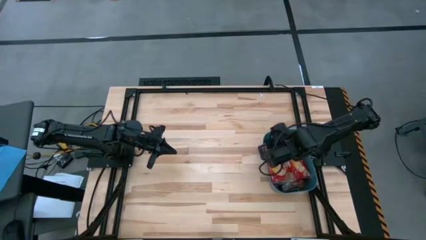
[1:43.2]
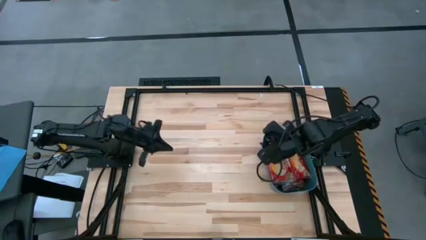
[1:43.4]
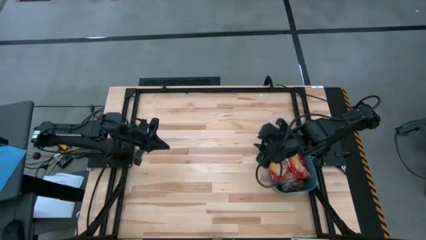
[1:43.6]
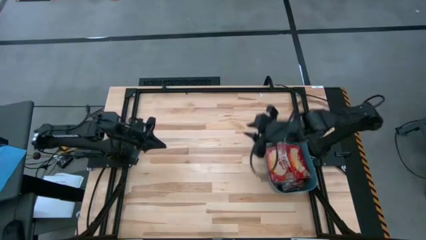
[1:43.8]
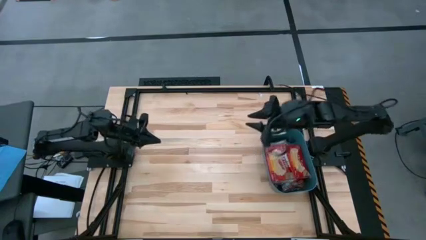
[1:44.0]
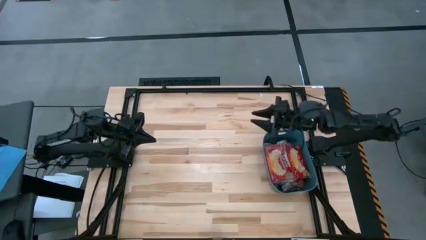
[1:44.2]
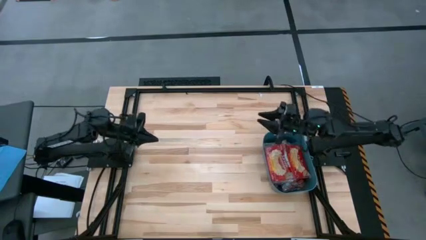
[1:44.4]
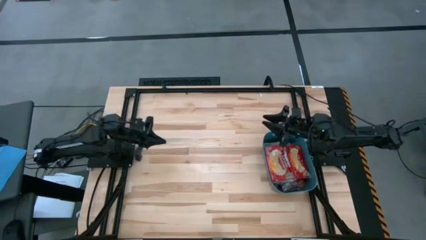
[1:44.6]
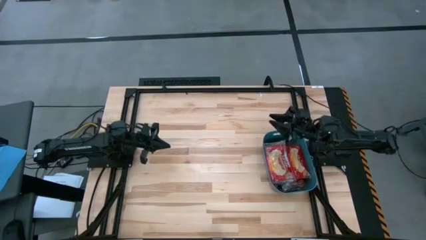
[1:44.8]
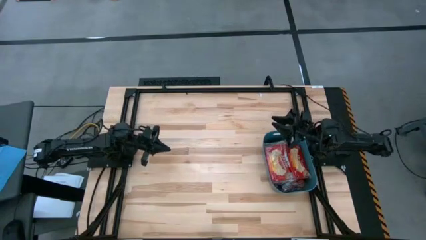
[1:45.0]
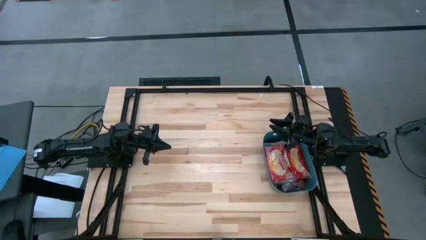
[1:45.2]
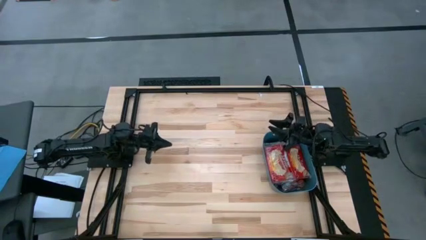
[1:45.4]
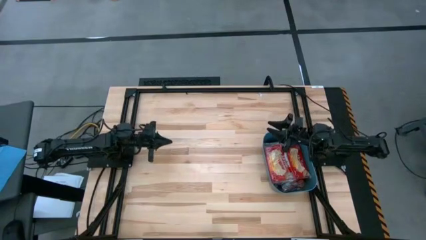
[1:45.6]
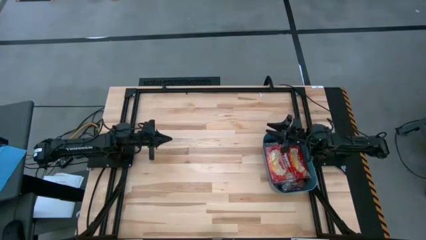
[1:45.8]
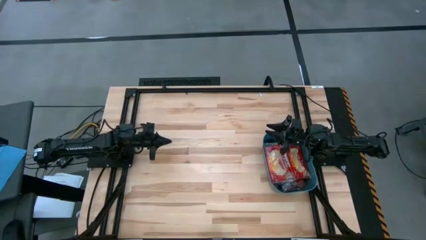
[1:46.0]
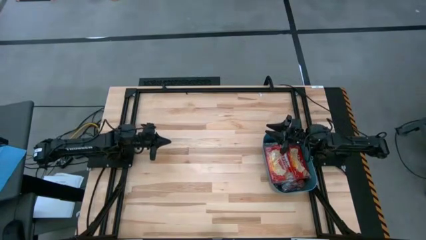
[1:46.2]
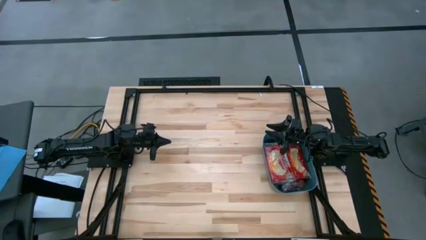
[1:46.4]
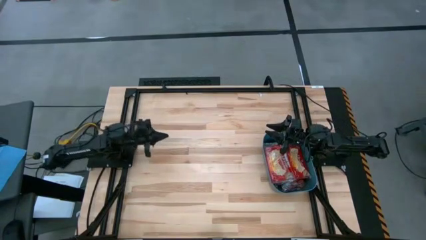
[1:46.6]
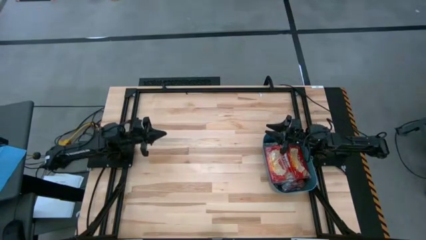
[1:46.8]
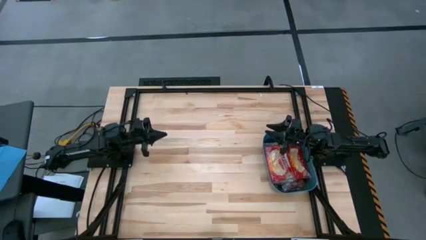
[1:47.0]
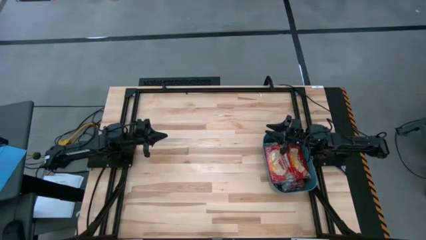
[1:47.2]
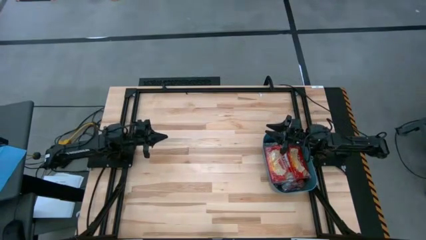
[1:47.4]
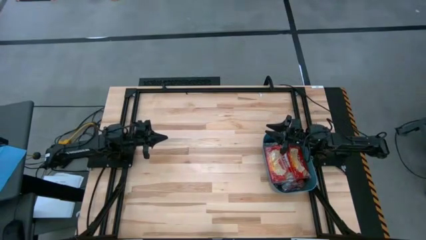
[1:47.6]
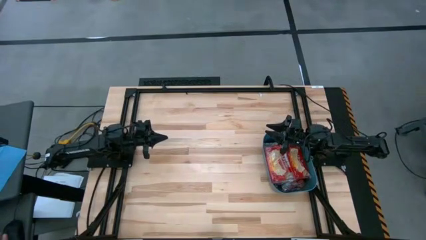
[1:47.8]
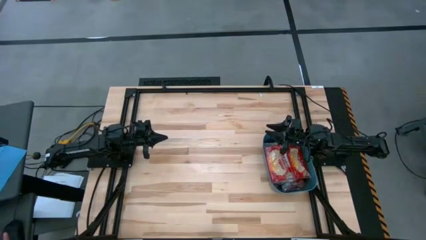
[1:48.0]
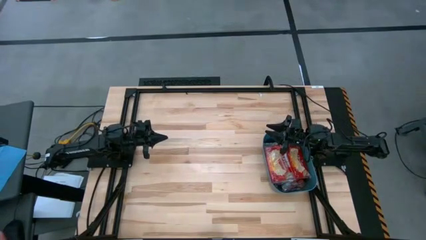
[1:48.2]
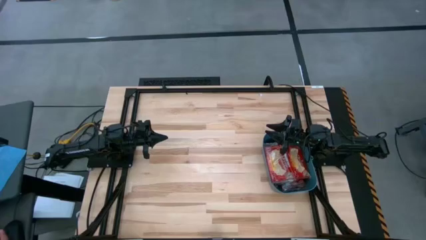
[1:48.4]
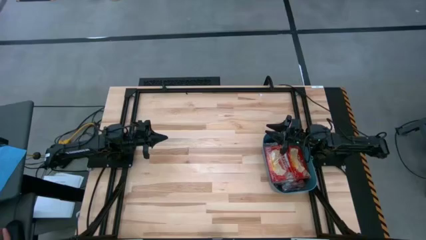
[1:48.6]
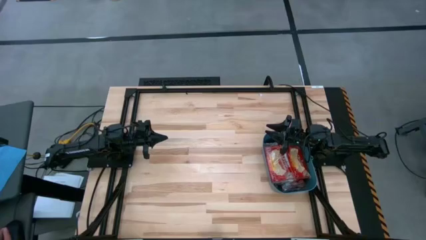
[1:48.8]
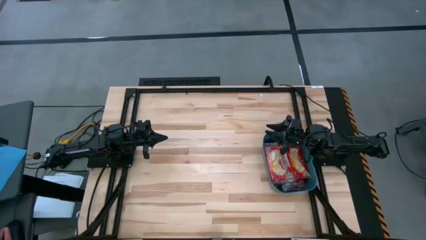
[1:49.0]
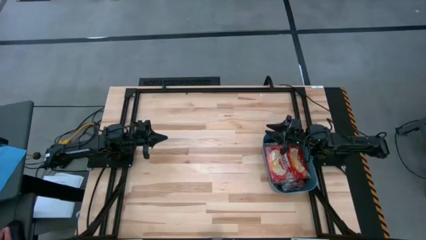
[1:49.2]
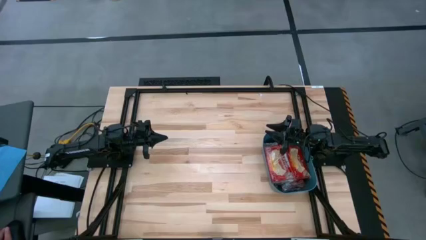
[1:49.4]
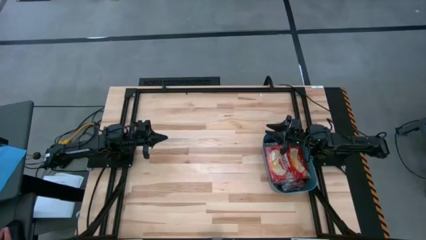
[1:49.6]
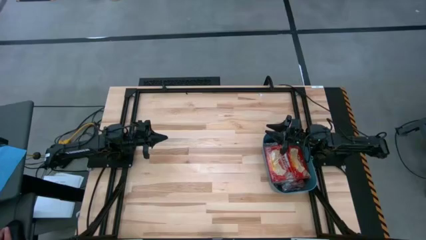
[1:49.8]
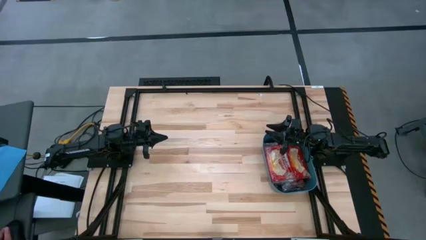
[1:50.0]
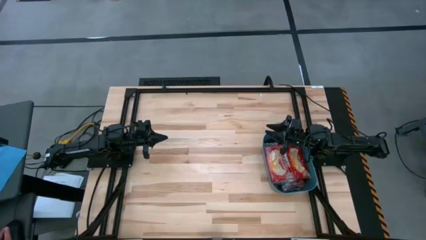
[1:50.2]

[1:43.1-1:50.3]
Task: Sort popcorn bags into baskets
Return to home position

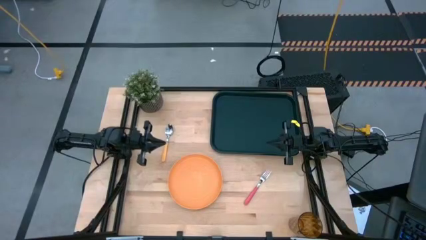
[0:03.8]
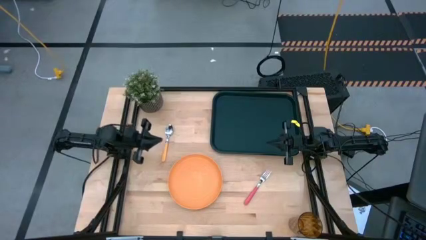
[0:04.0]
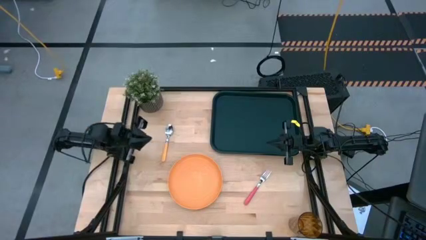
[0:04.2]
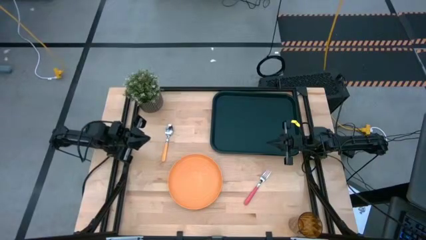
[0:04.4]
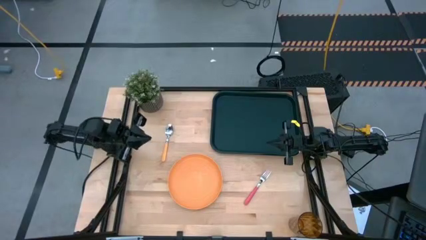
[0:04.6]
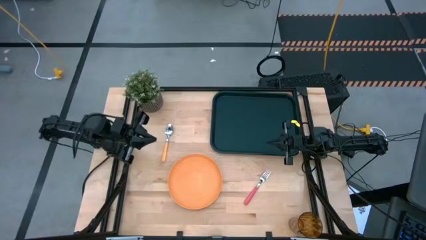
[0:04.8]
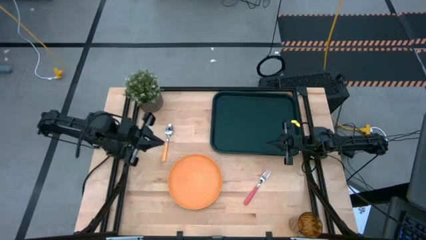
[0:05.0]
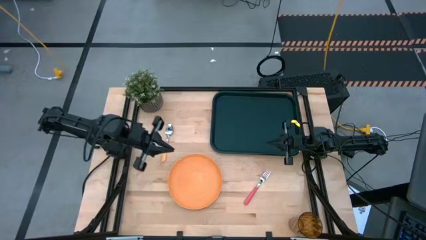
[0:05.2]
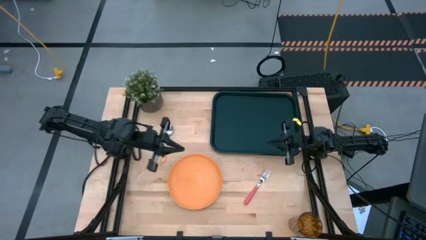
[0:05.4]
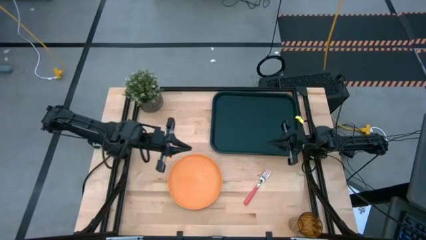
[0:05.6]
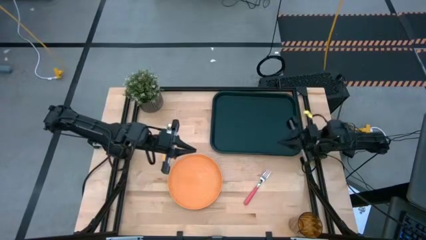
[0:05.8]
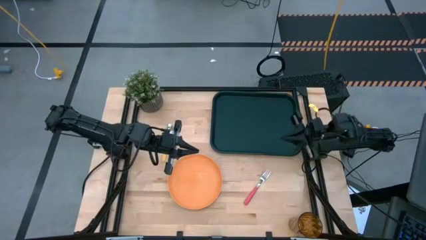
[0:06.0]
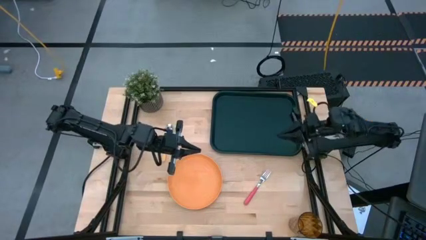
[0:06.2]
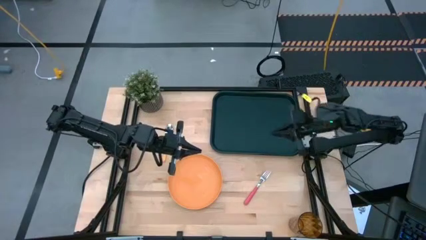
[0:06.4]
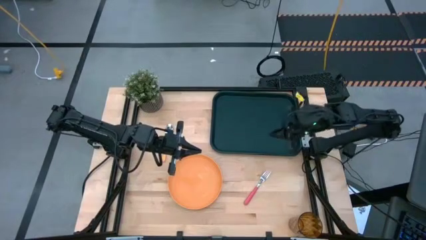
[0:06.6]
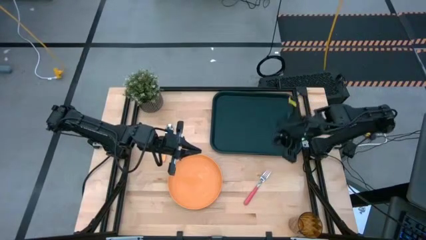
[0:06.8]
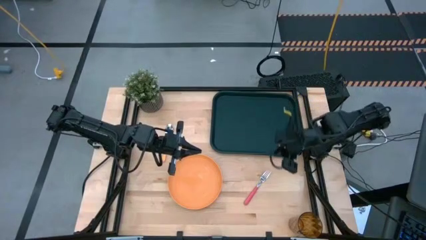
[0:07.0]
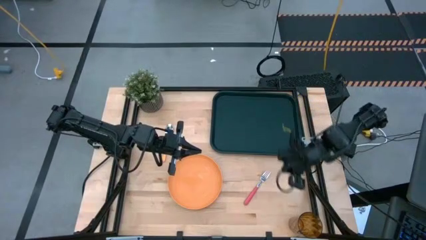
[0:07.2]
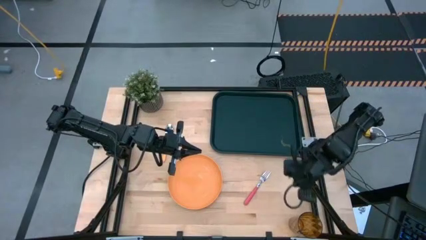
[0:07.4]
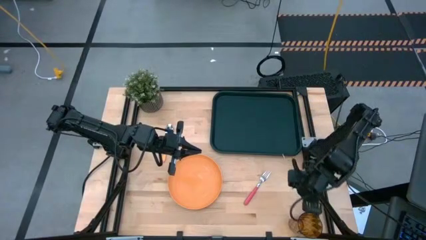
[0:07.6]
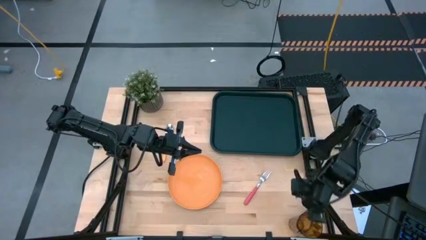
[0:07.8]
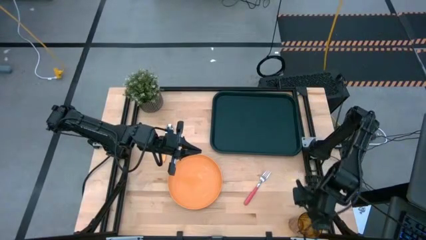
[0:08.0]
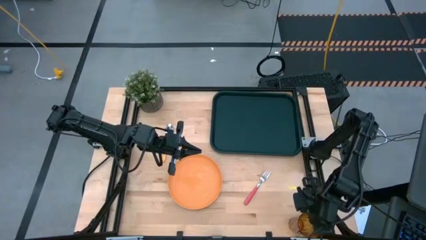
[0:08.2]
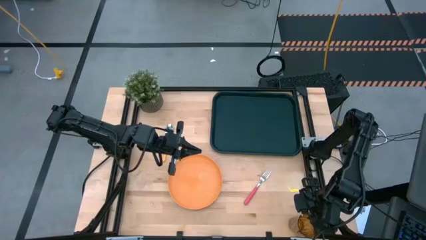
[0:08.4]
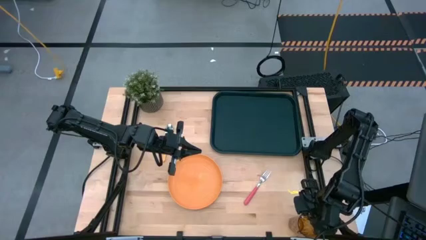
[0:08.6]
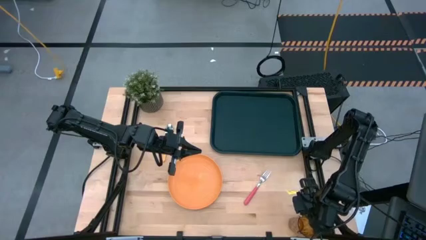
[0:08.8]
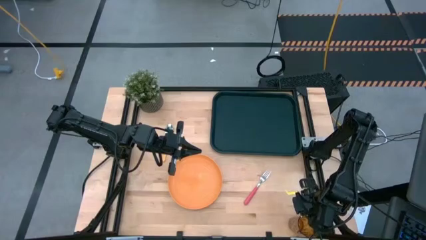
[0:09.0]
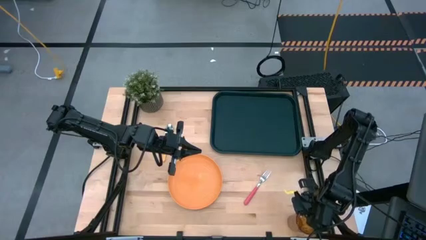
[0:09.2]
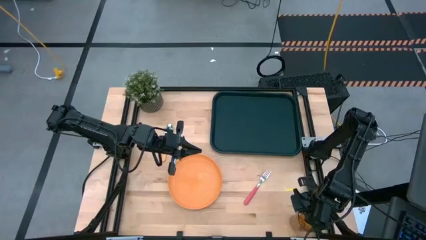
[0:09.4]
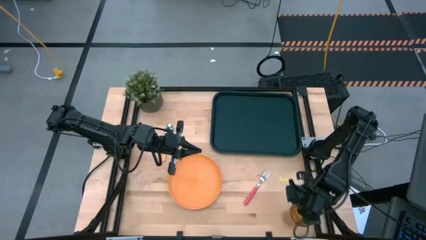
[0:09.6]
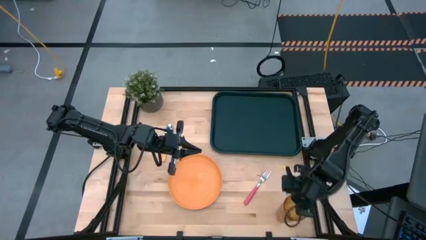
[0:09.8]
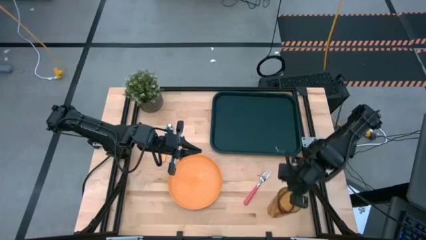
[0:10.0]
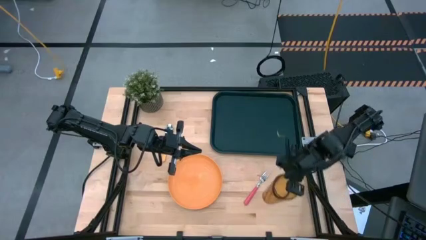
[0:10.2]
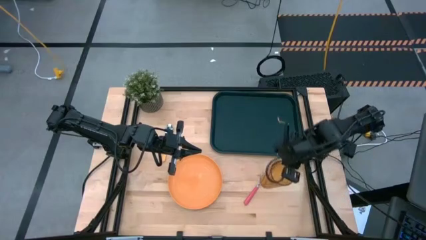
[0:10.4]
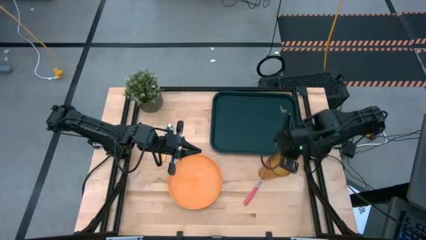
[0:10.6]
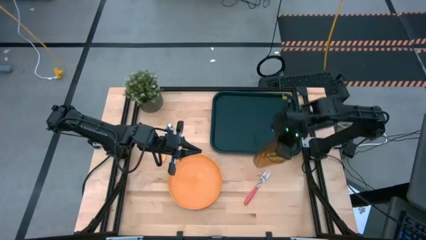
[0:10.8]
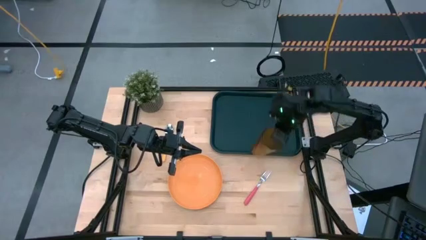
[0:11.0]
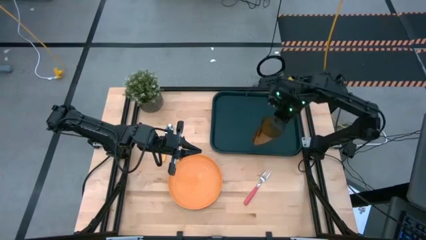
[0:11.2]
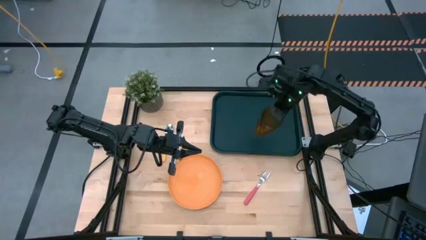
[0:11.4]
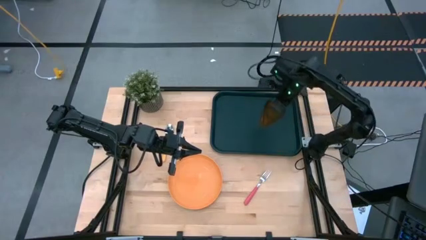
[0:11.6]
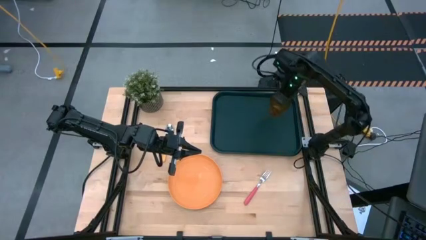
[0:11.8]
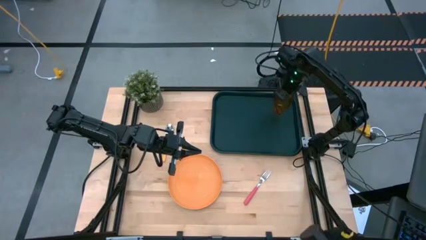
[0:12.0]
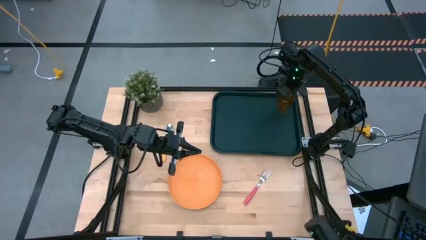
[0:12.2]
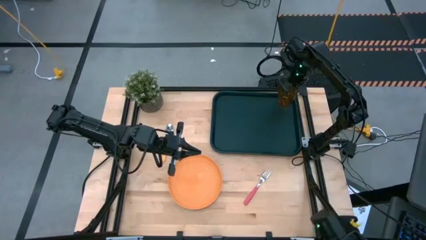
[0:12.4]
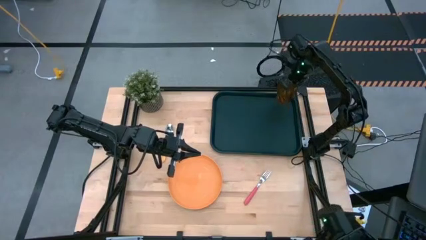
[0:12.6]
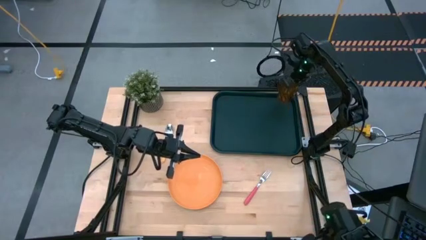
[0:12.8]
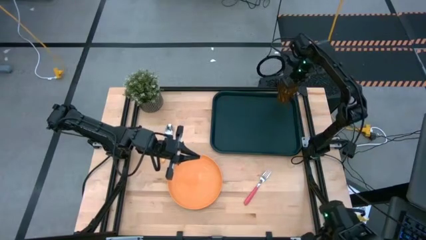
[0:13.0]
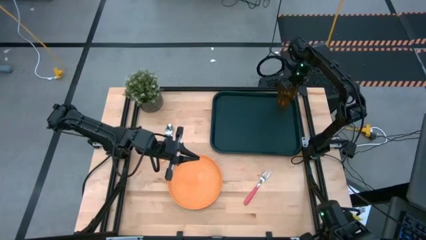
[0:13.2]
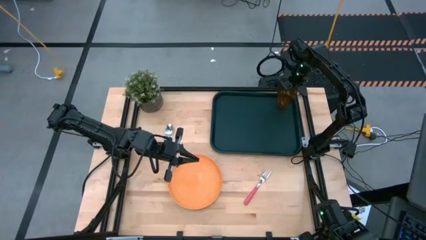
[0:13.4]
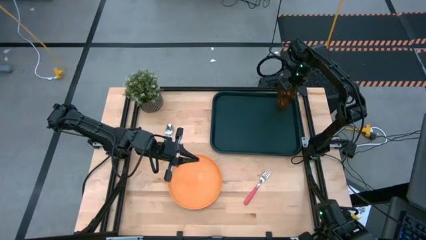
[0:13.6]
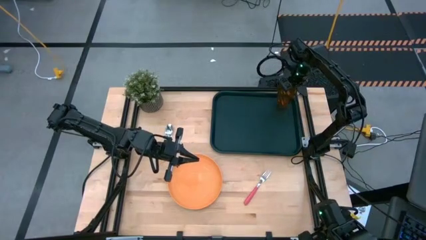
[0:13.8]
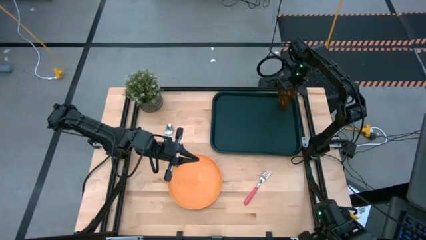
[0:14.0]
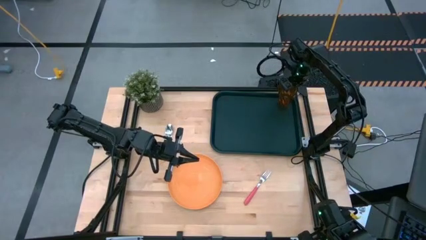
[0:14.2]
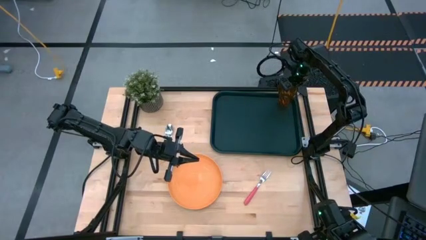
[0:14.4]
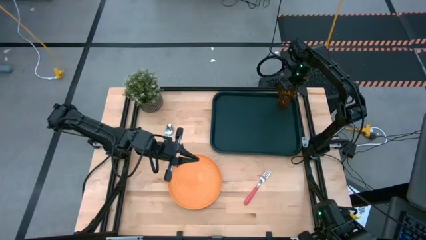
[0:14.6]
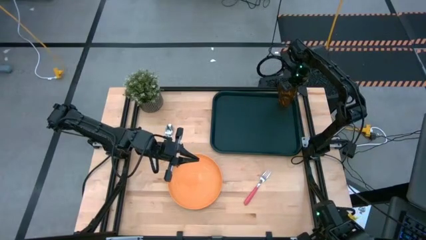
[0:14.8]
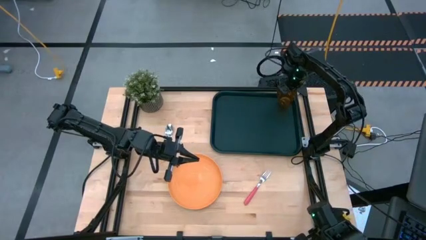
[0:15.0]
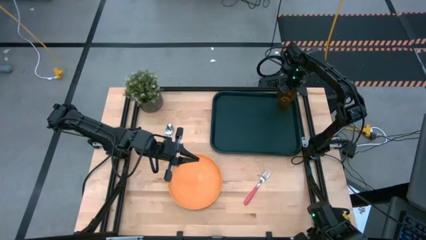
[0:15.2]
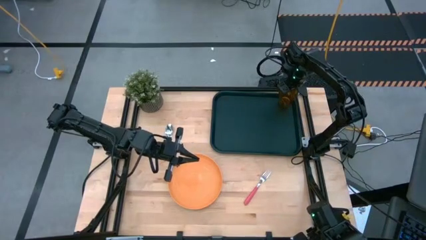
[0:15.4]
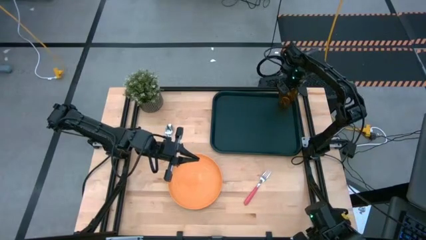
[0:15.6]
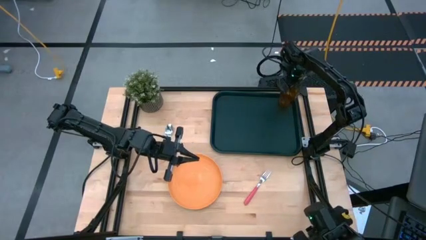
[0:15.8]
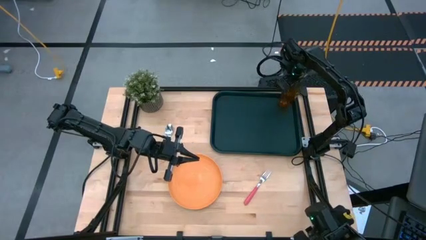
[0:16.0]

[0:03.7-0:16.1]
Task: Pick and place plate/cup/fork/spoon on tray
Put the brown cup on the top right of the black tray
